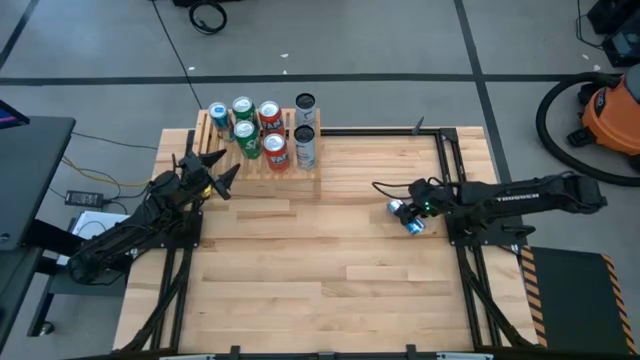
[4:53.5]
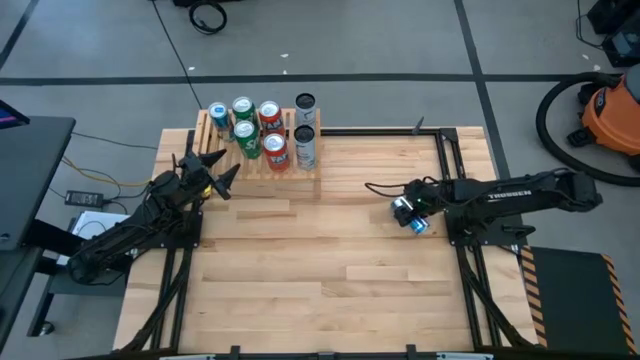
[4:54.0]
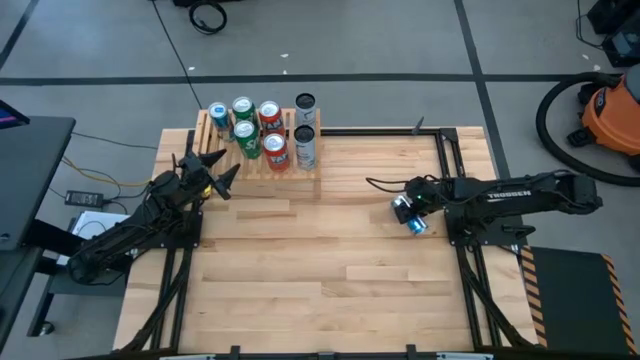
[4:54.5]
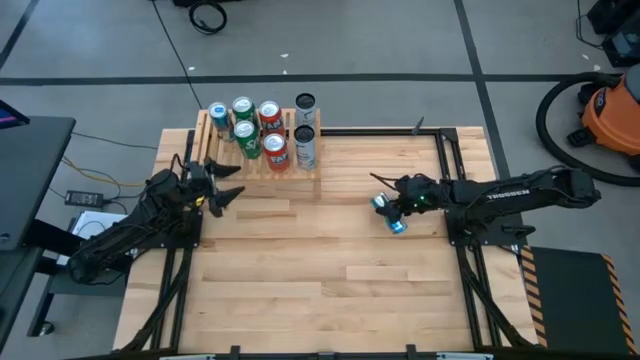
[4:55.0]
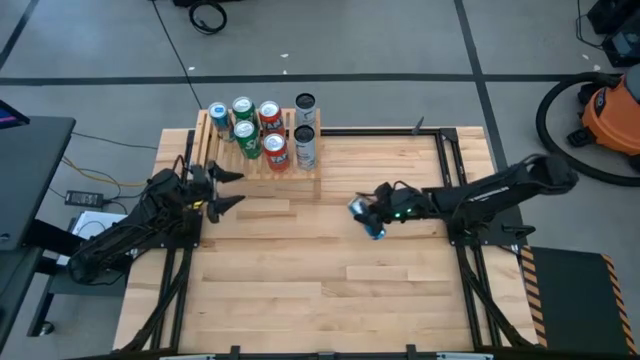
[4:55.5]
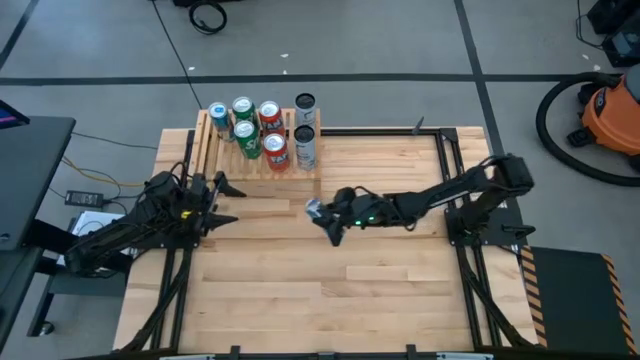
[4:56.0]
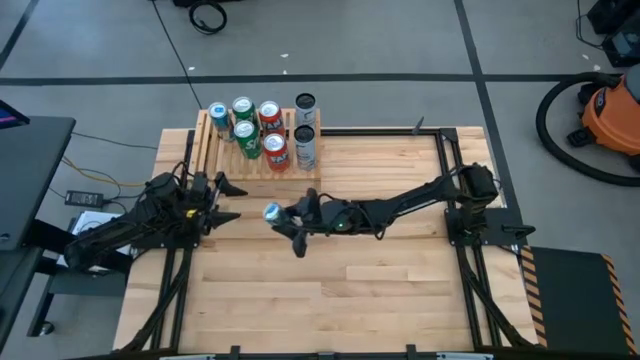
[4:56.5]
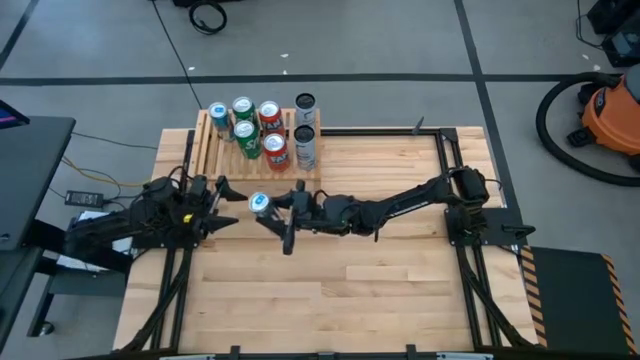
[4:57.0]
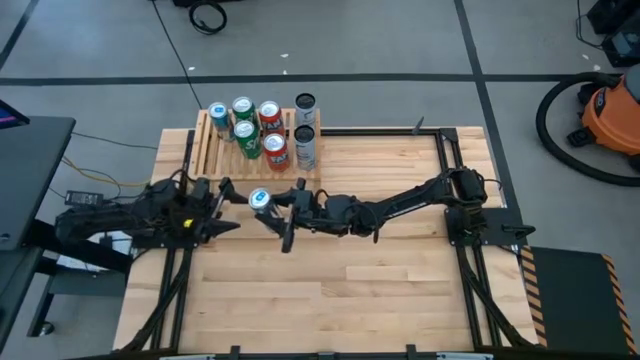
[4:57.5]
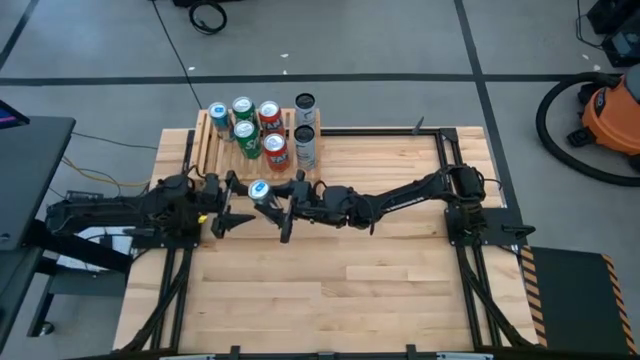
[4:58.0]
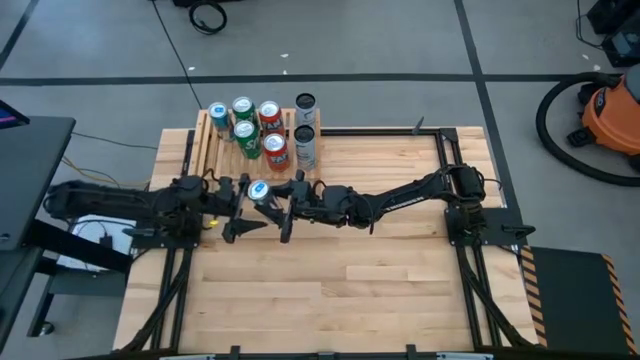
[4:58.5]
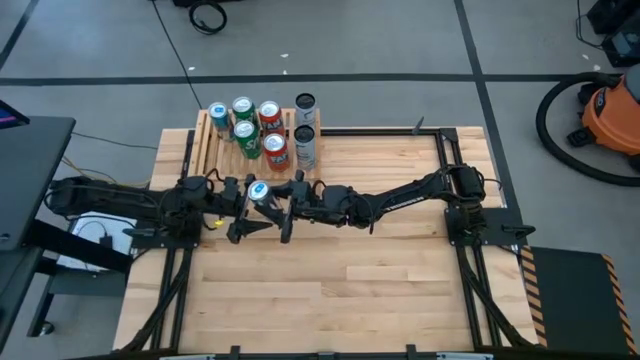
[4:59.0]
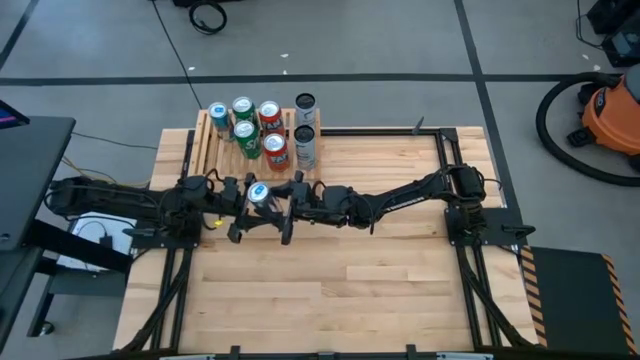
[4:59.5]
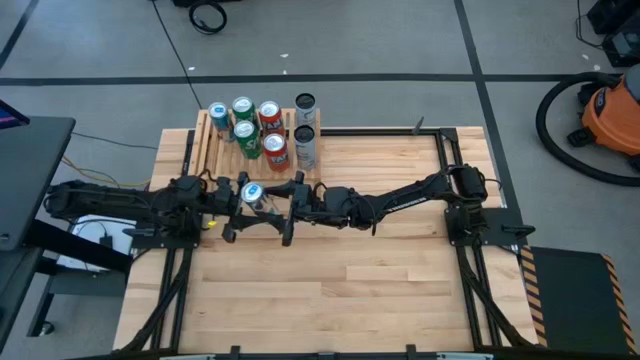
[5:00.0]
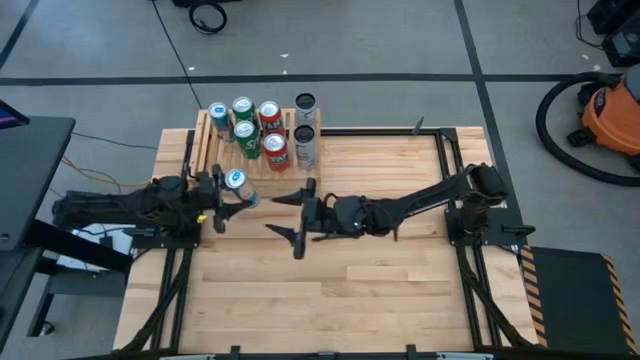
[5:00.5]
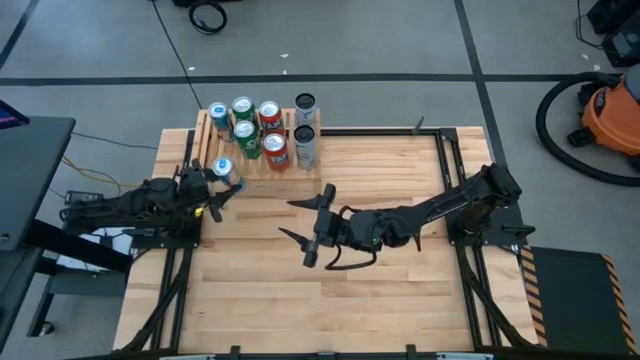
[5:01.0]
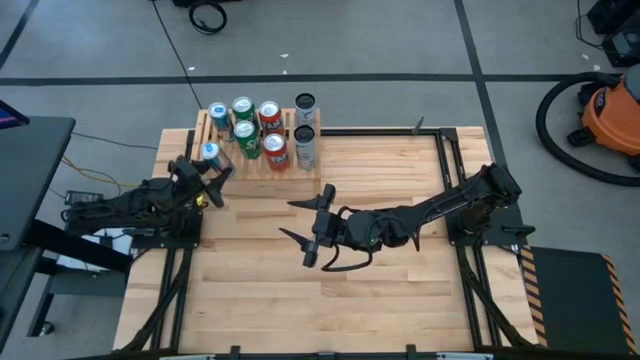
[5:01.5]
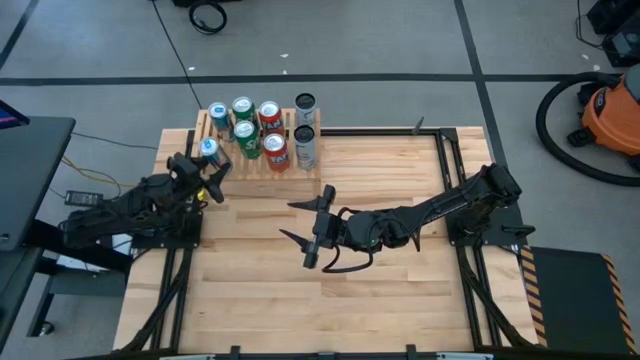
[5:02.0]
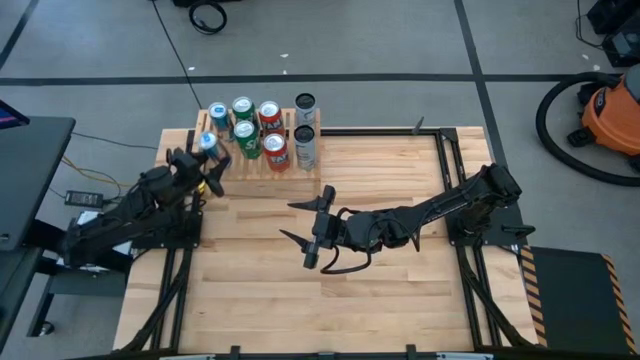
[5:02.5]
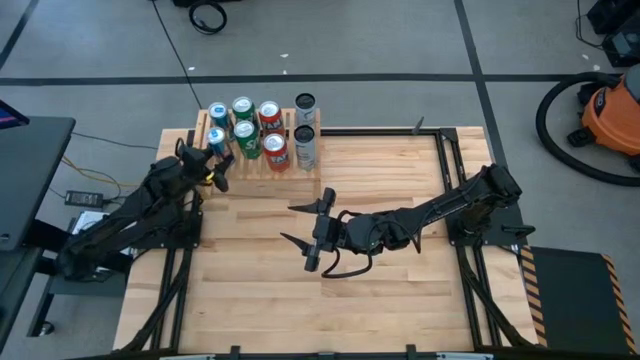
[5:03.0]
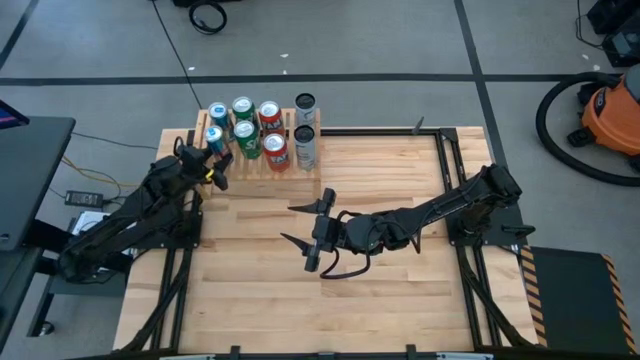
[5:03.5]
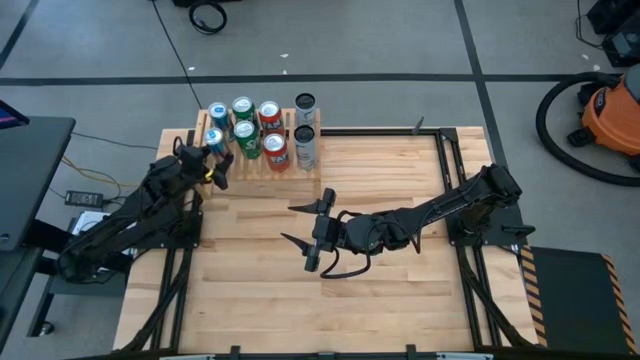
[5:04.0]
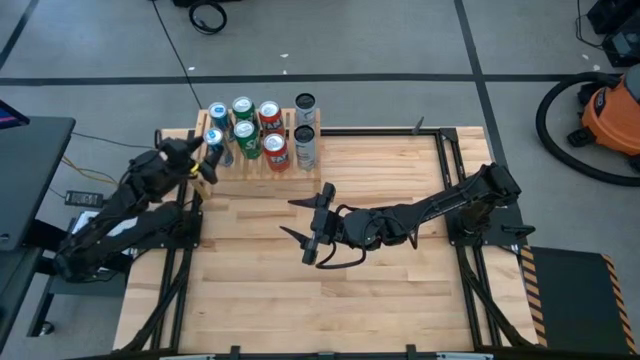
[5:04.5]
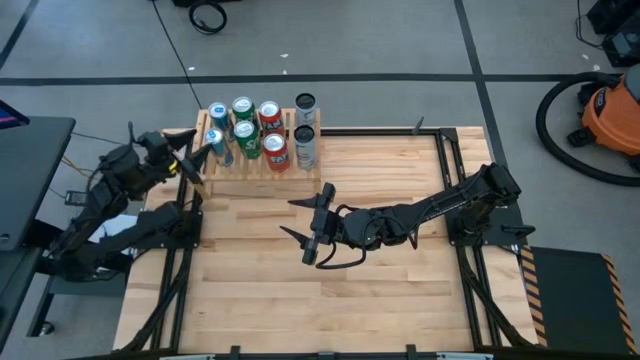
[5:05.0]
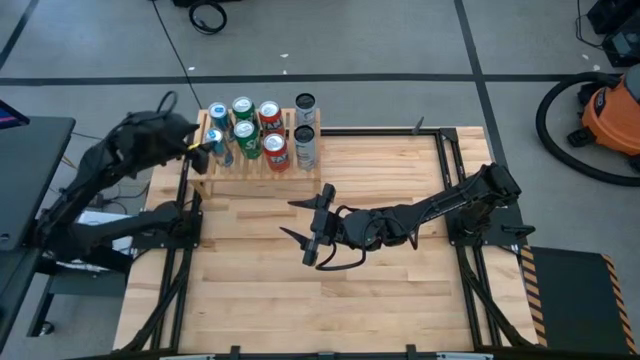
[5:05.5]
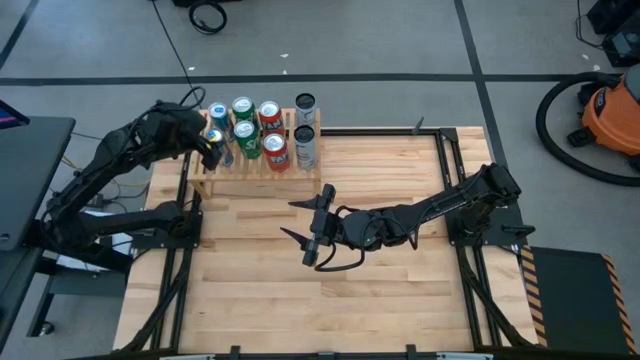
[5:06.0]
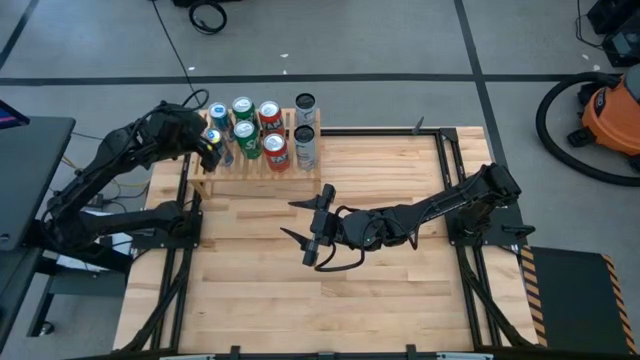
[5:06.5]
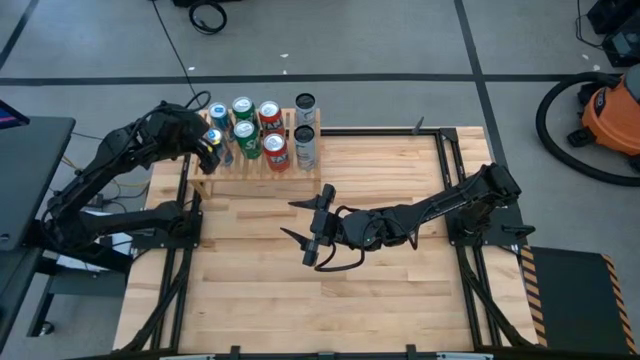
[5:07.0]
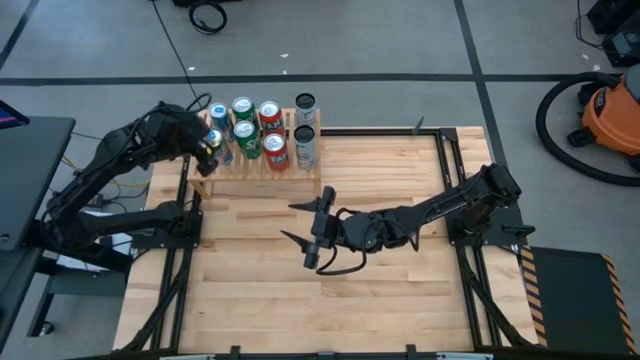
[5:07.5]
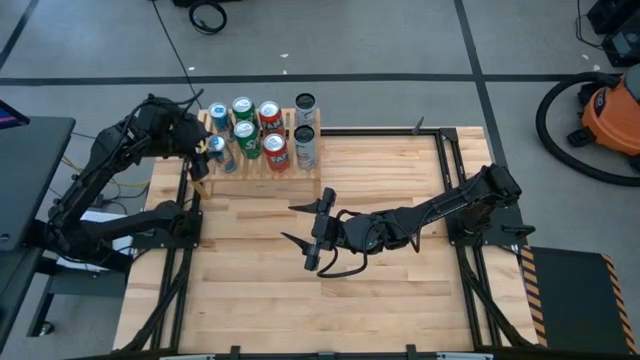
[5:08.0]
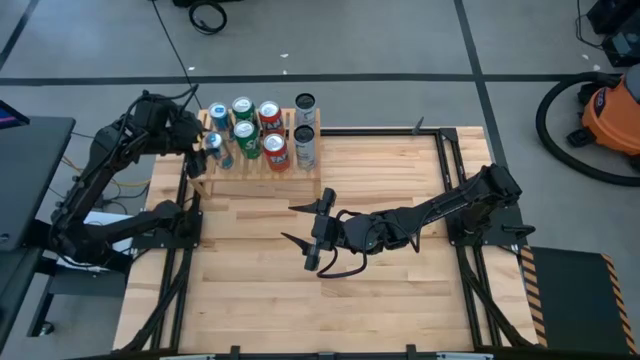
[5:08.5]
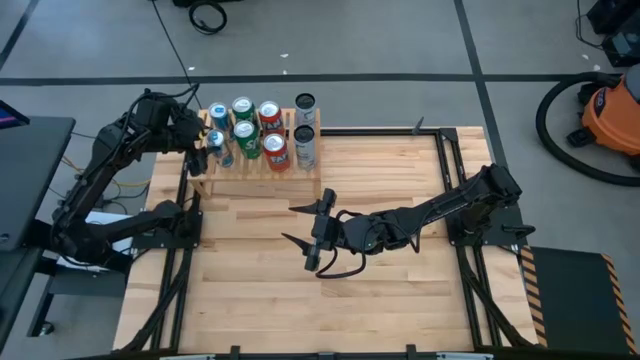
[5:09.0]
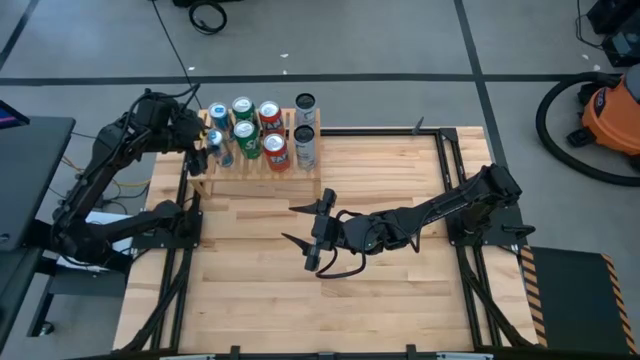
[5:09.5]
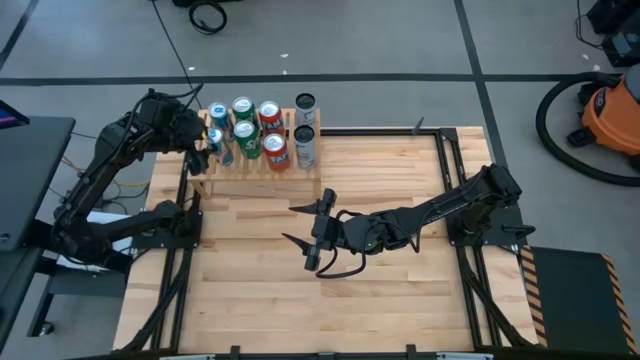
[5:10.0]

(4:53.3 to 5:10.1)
Task: Place canned beverage on shelf
Put the blue soda can on the shelf

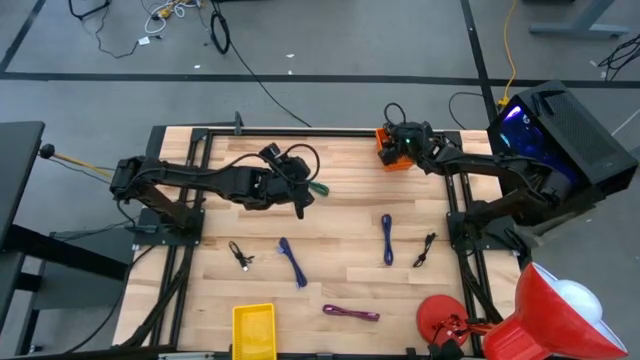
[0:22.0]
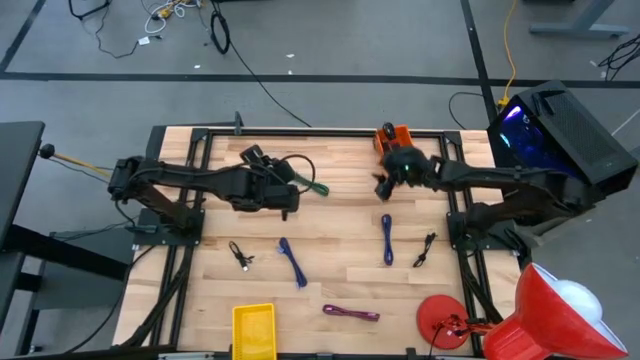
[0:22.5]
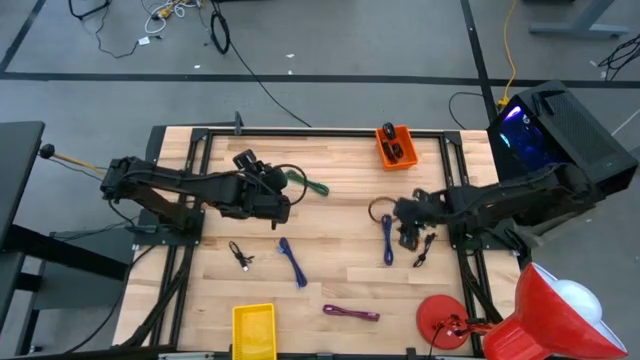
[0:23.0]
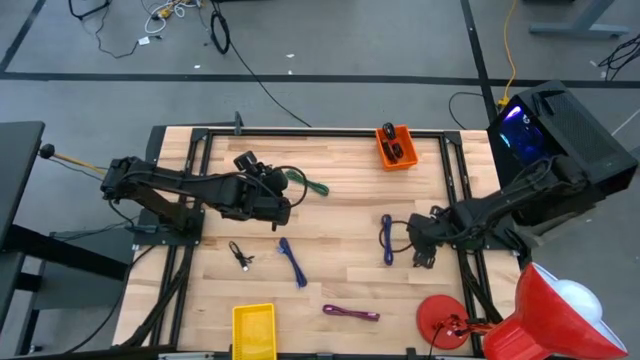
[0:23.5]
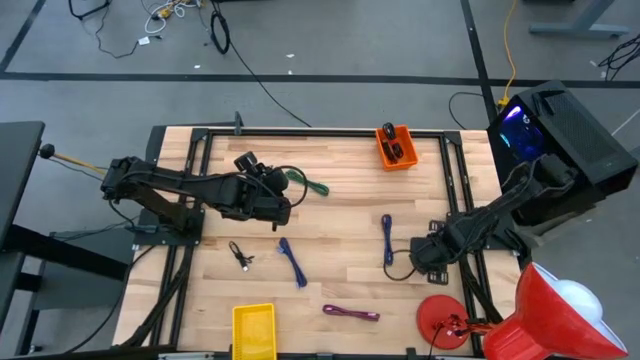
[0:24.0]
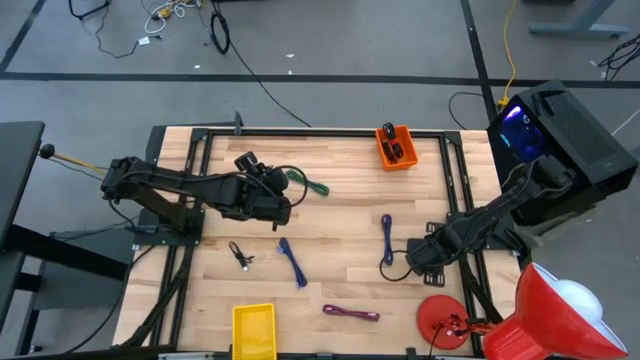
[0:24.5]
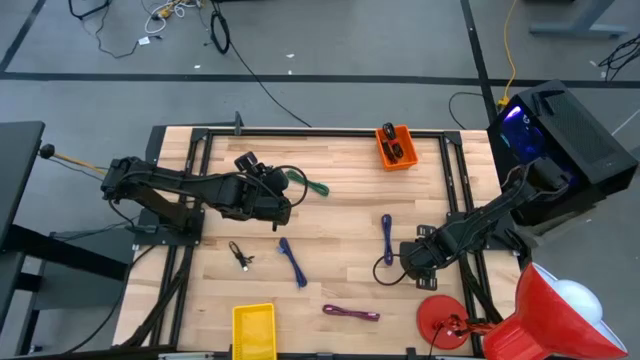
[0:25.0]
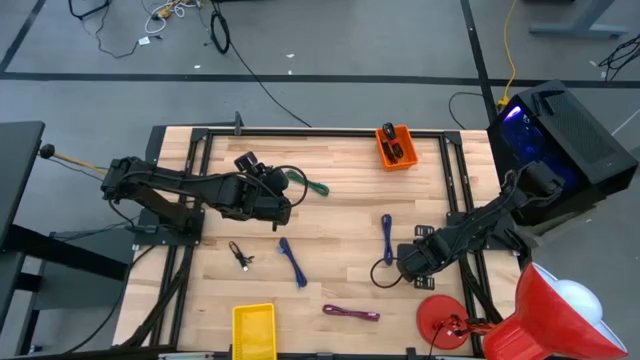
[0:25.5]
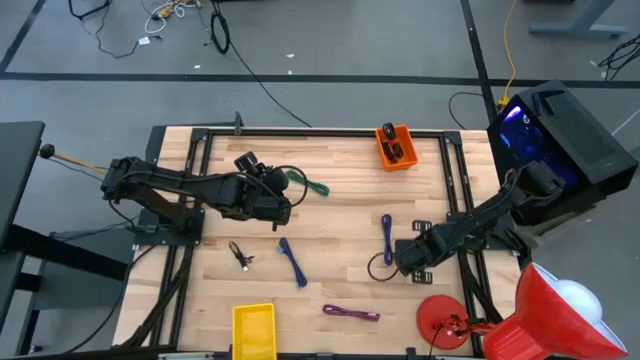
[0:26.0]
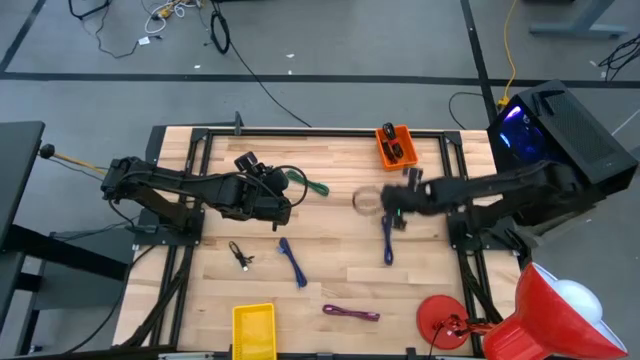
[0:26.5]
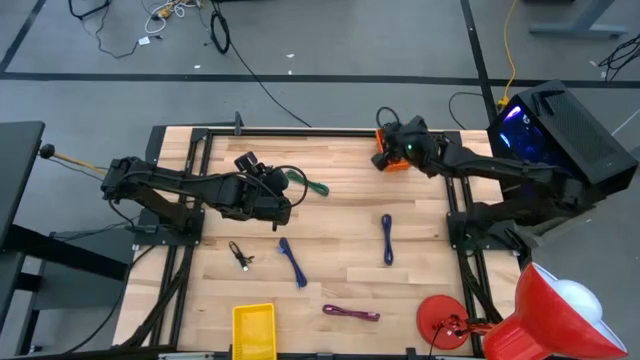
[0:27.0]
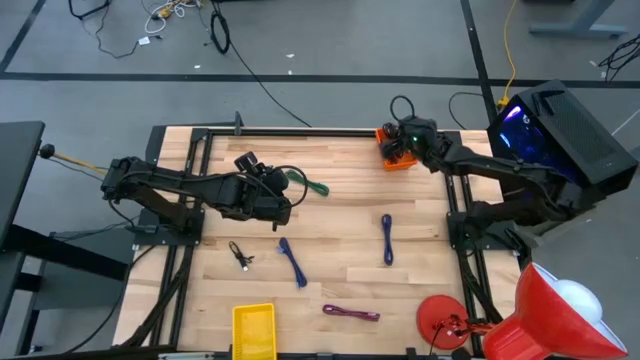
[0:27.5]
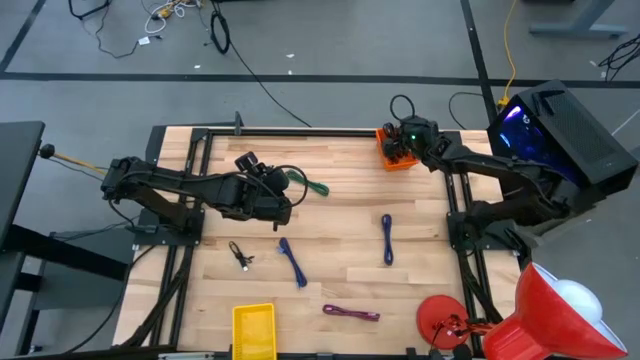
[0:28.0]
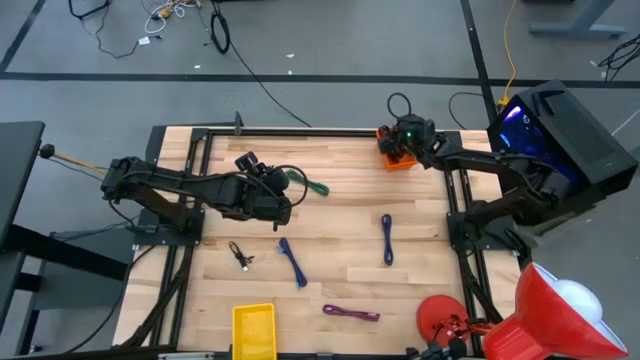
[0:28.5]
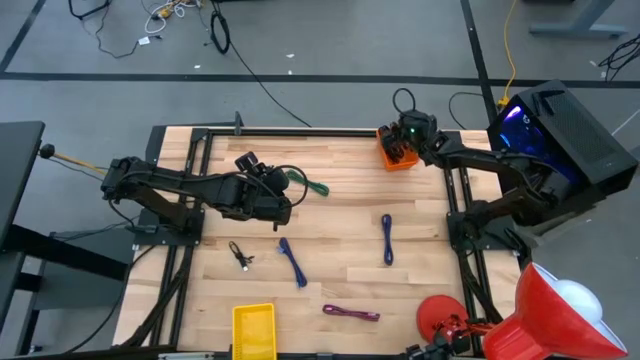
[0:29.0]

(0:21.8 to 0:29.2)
Task: Pick & Place USB Port
Put the black charger cable into the orange bin
